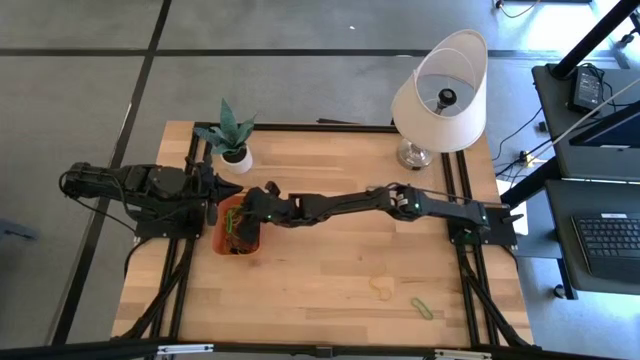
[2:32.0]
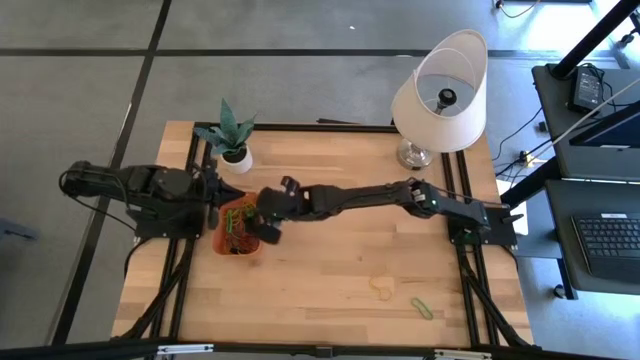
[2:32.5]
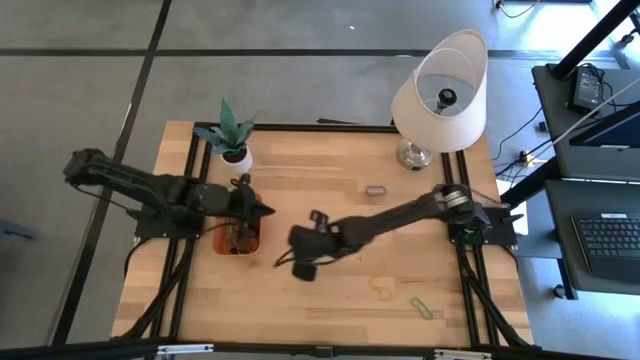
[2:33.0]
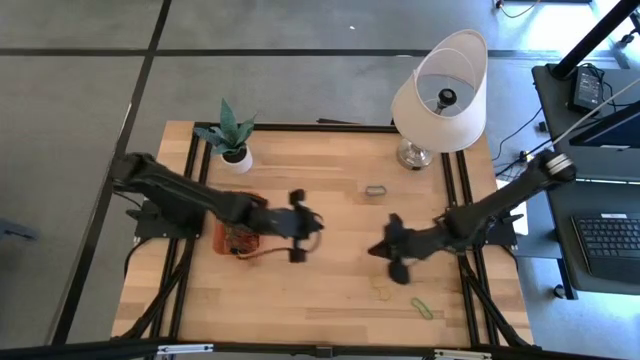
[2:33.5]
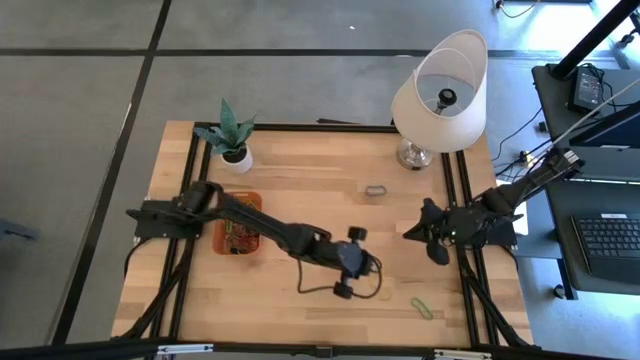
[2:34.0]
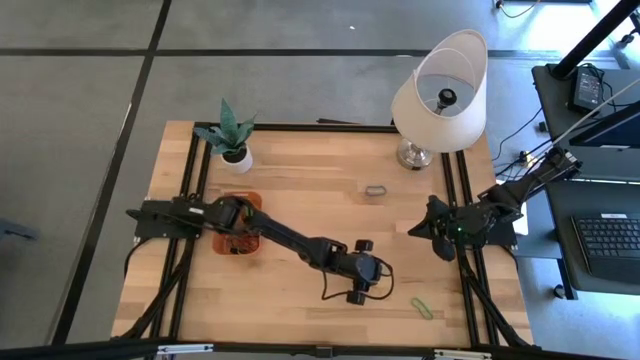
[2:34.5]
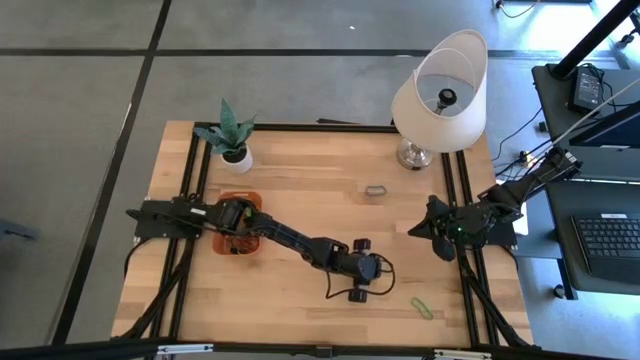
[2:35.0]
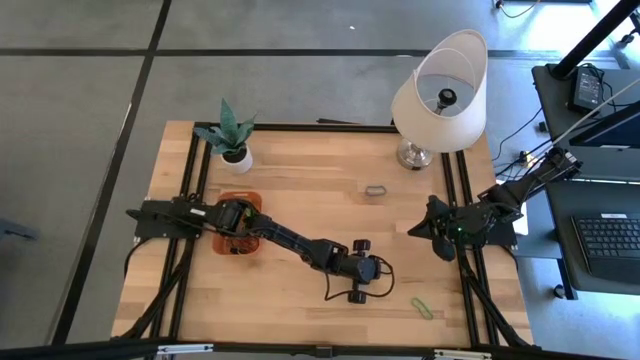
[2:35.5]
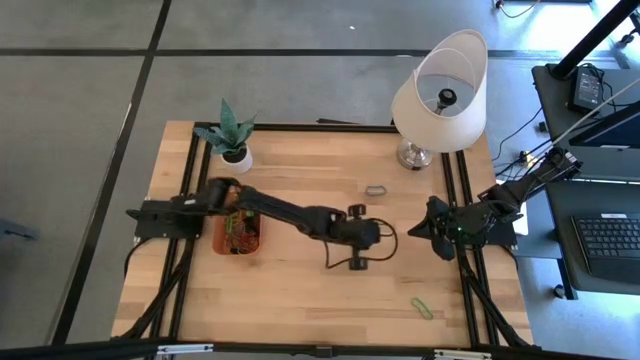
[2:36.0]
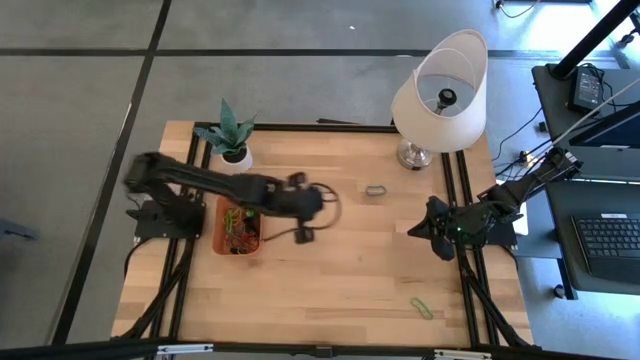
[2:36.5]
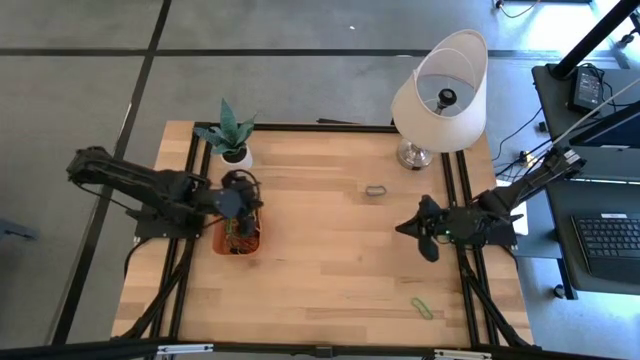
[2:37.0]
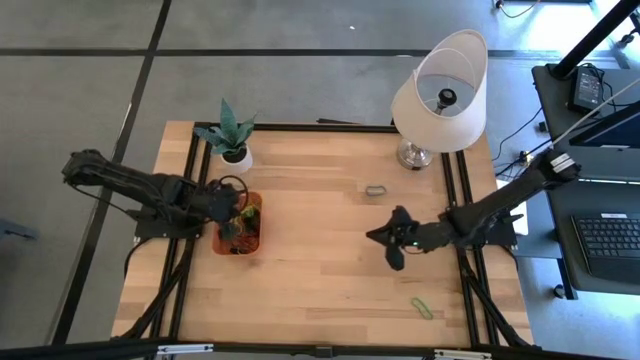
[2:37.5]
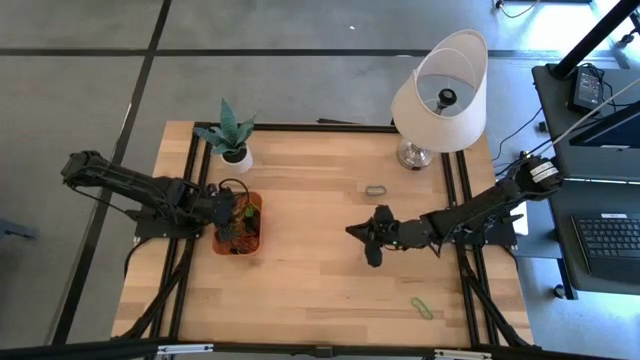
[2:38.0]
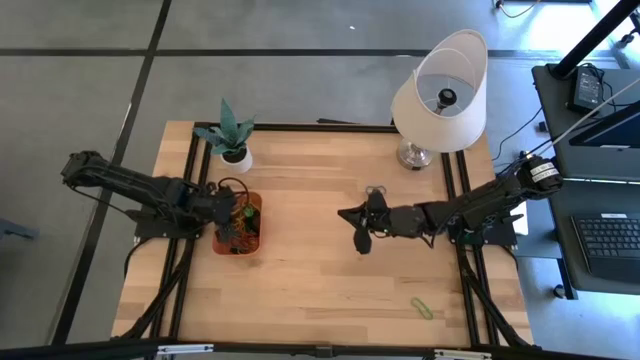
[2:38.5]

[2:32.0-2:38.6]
Task: Pick and place rubber bands into bin
Put the yellow rubber band into the orange bin

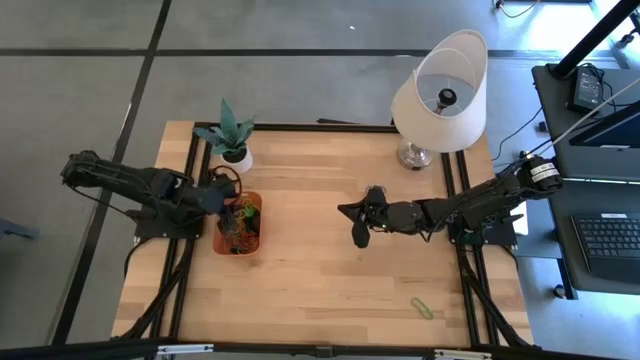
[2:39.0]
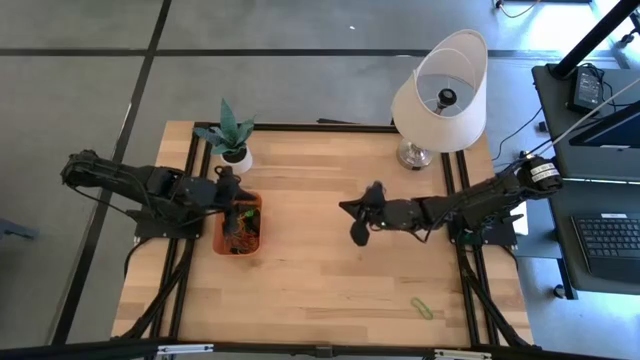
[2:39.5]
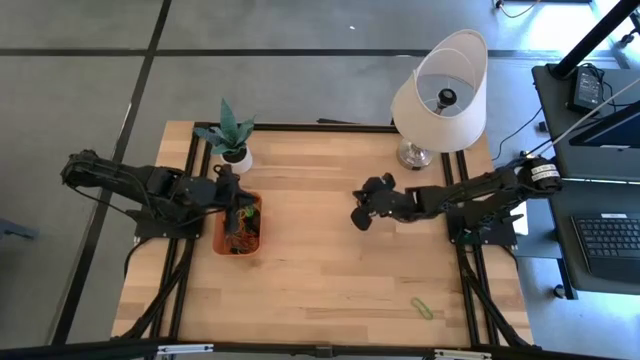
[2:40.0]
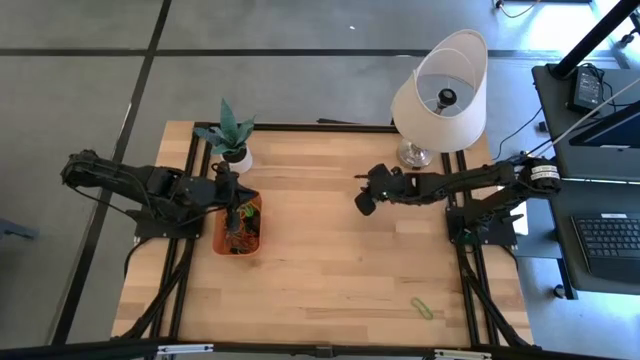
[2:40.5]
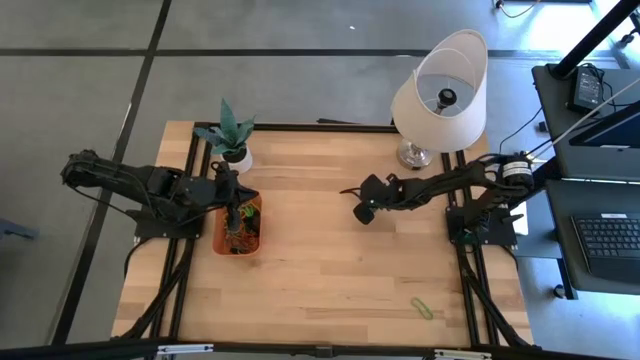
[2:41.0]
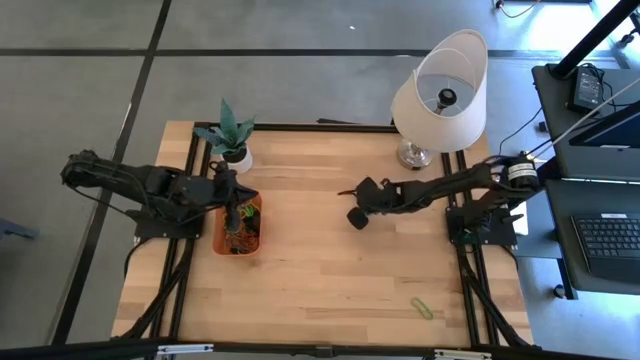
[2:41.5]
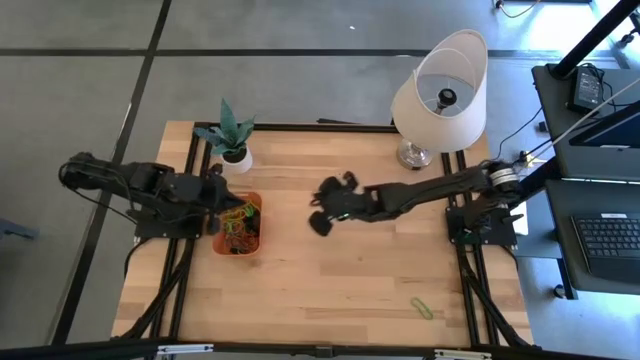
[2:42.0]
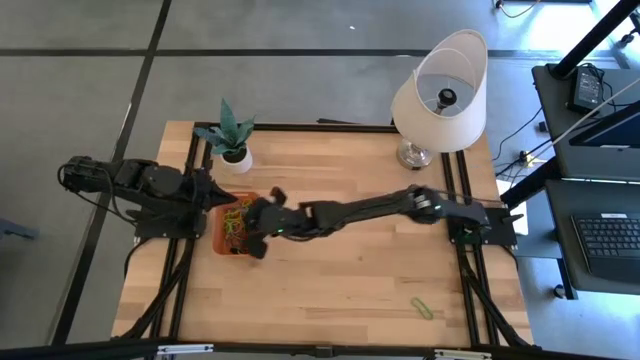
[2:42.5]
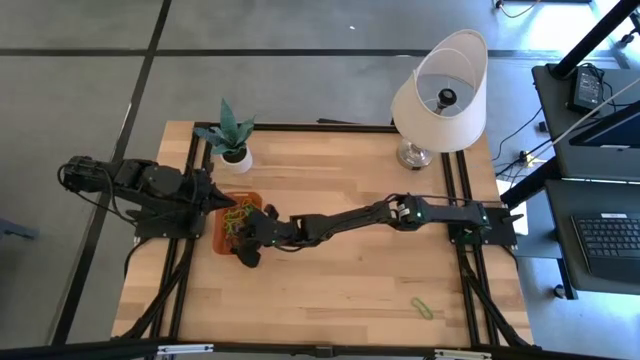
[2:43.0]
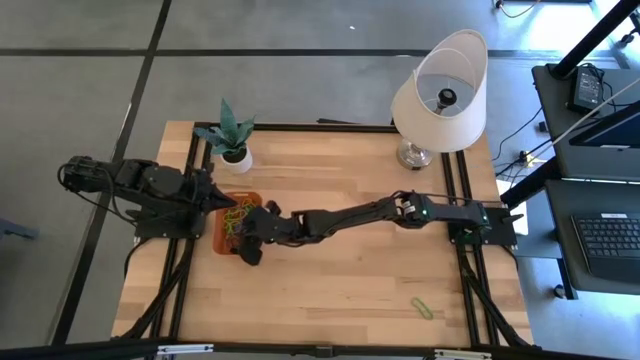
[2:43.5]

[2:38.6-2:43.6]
Put the blue rubber band into the orange bin

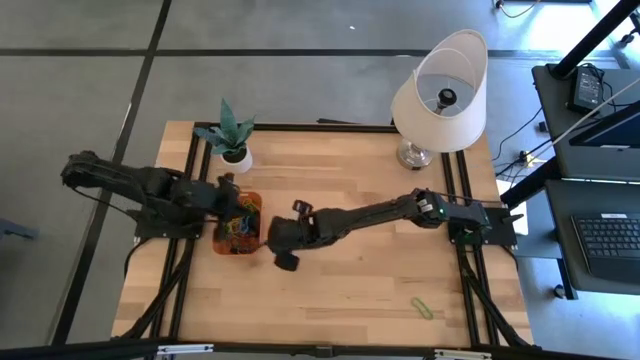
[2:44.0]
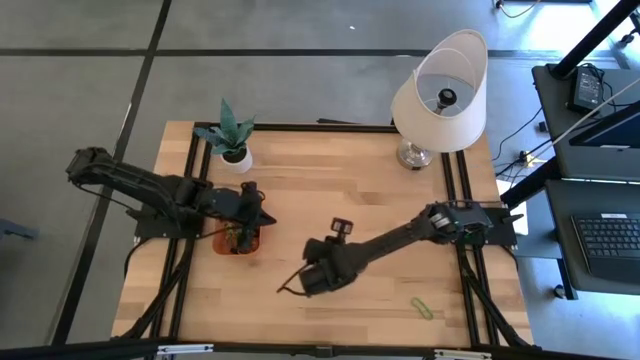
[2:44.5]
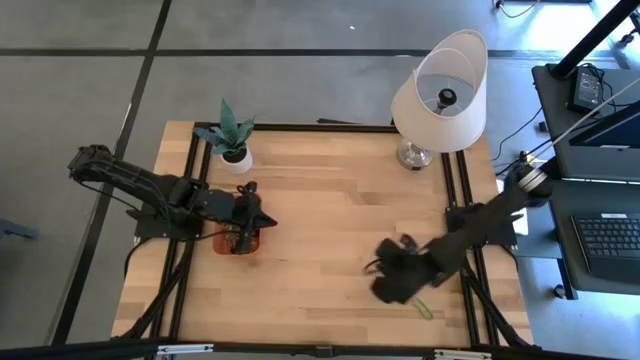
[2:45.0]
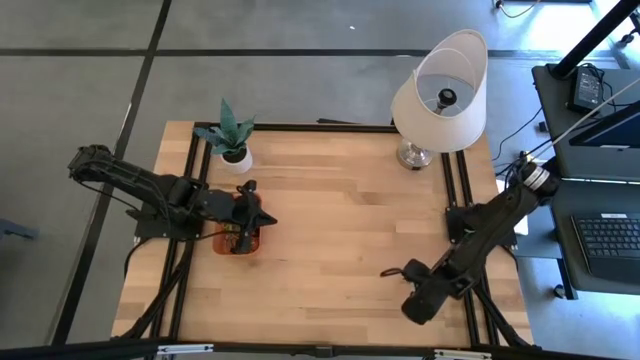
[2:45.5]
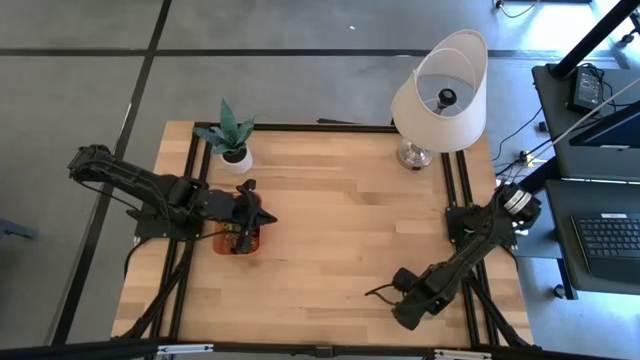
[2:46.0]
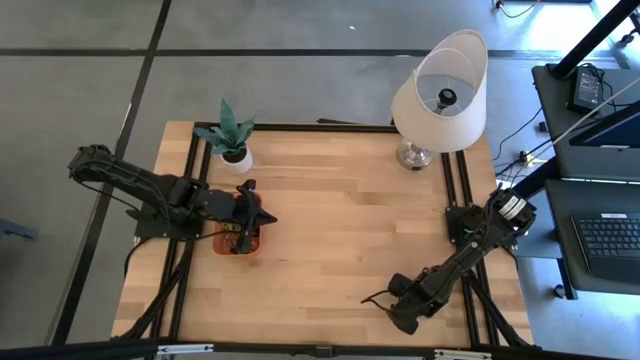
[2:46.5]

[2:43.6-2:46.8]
Put the green rubber band into the orange bin

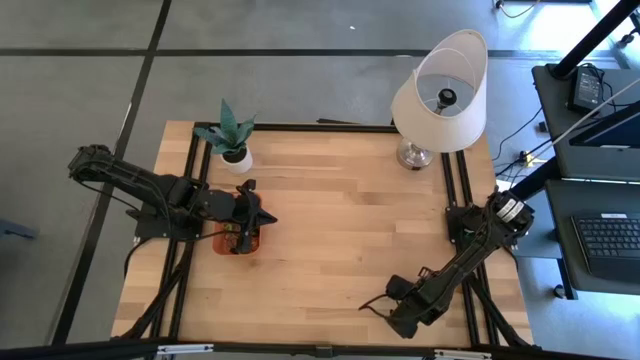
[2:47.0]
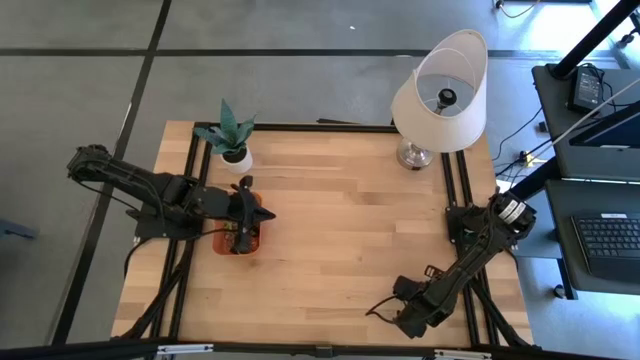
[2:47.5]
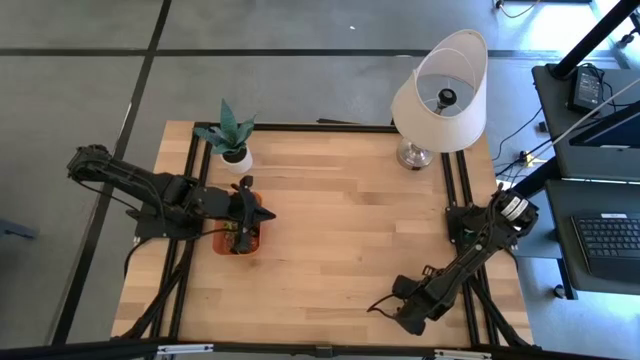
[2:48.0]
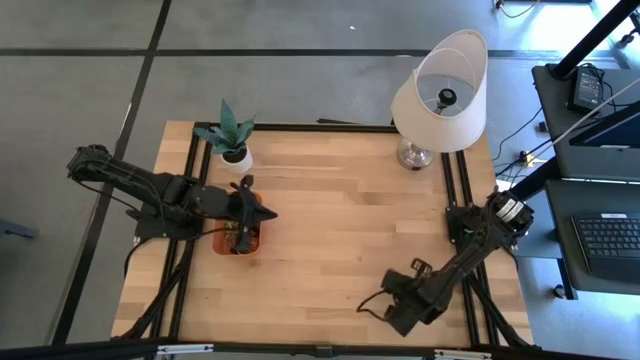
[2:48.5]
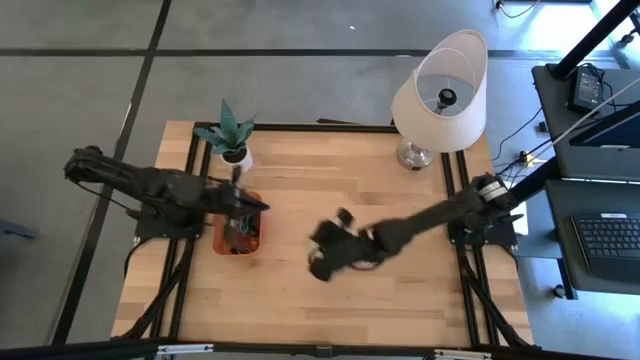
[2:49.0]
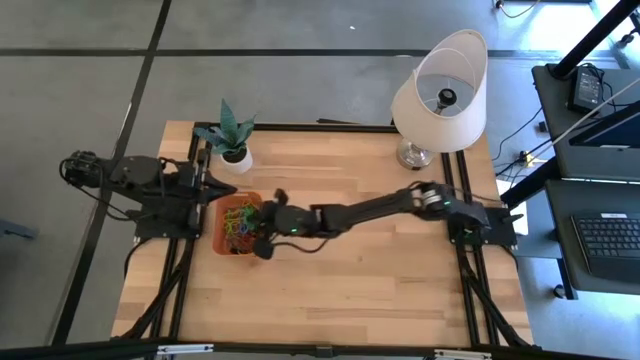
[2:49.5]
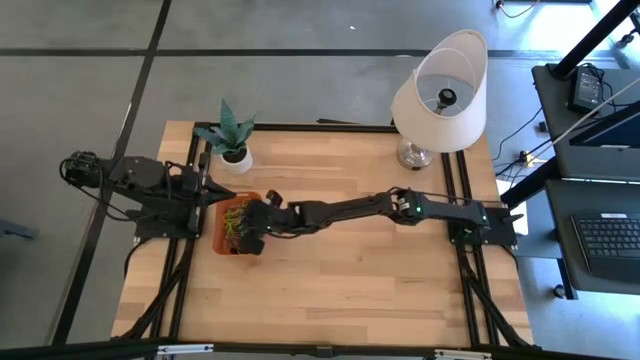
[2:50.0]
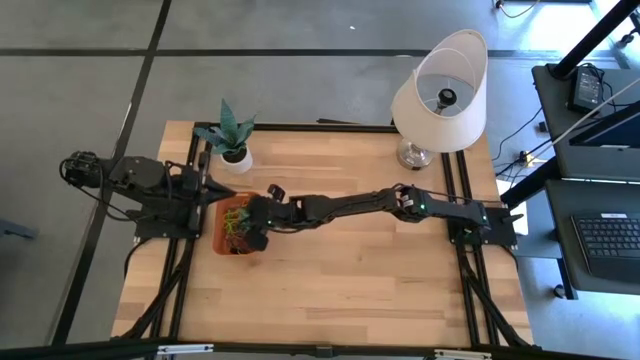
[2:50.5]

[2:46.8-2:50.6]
Put the blue rubber band into the orange bin

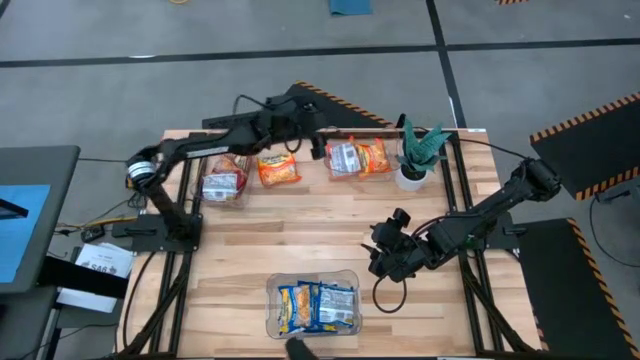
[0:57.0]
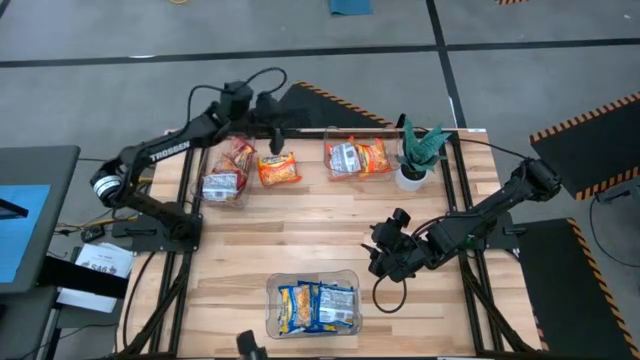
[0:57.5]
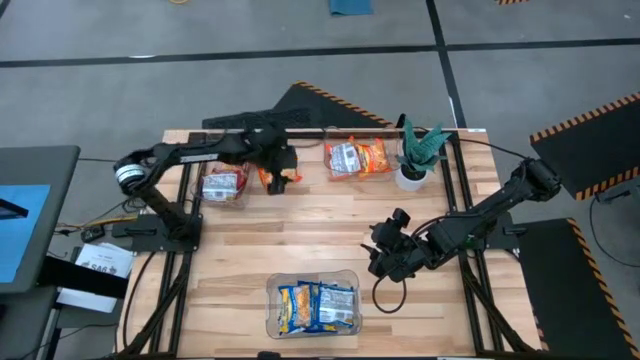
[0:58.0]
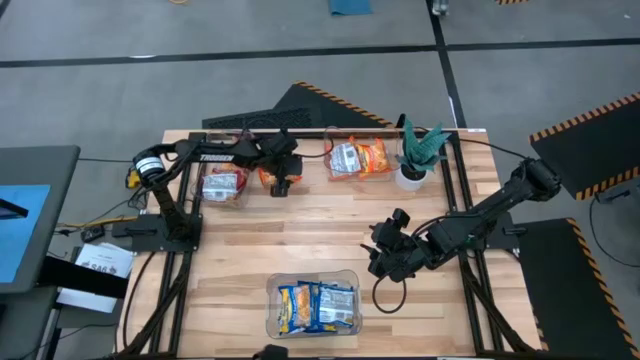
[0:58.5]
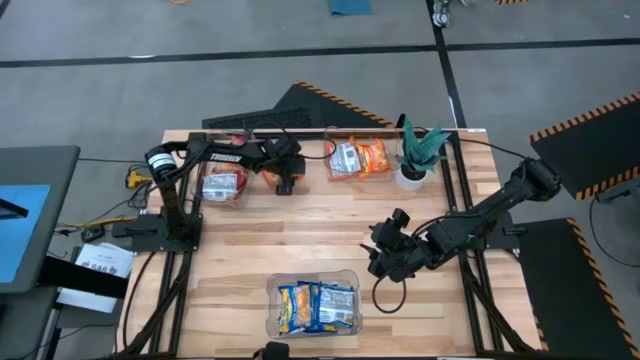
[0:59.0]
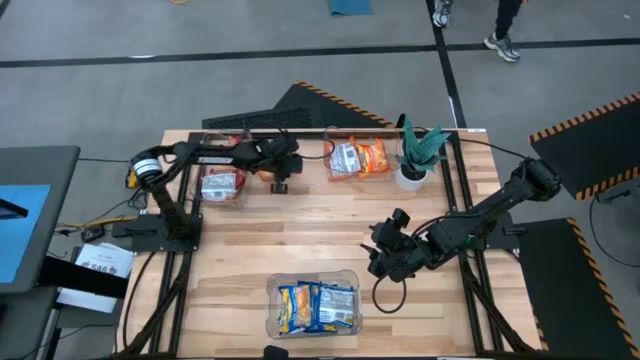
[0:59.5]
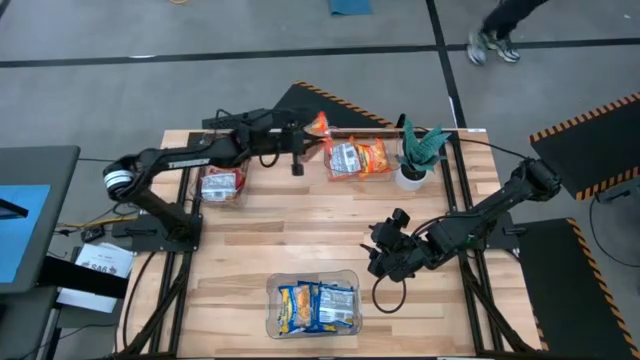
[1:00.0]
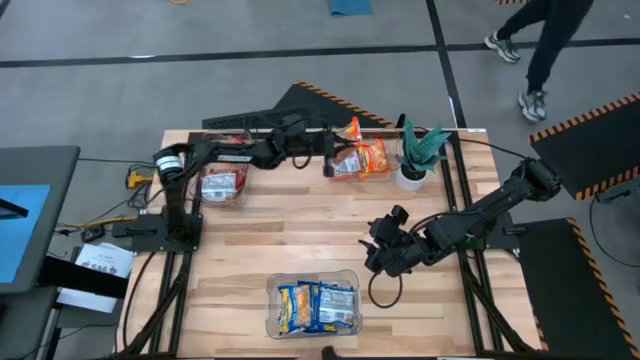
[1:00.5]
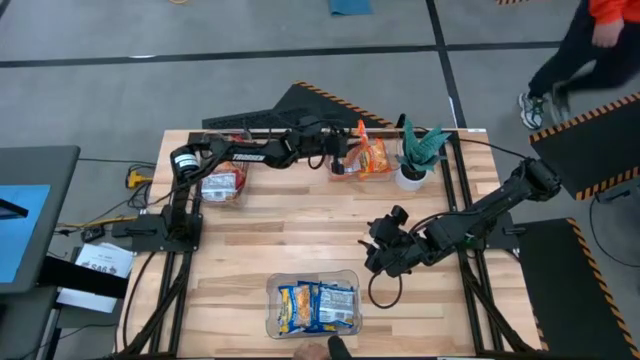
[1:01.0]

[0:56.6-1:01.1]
Task: Sort Maruchan noodles
Put the orange noodle pack into the top right transparent bin
